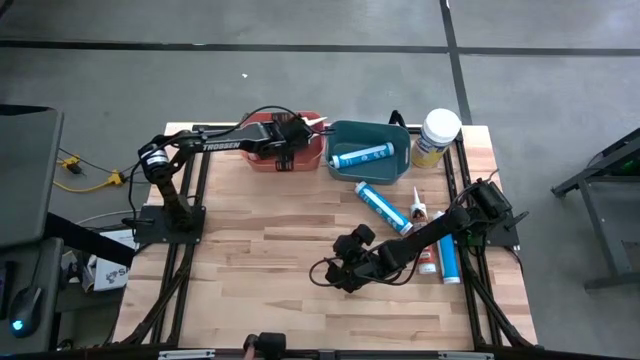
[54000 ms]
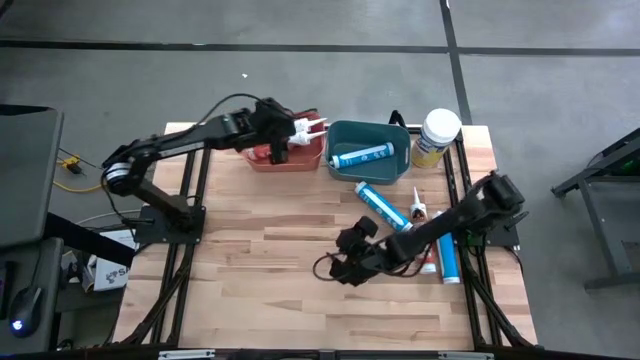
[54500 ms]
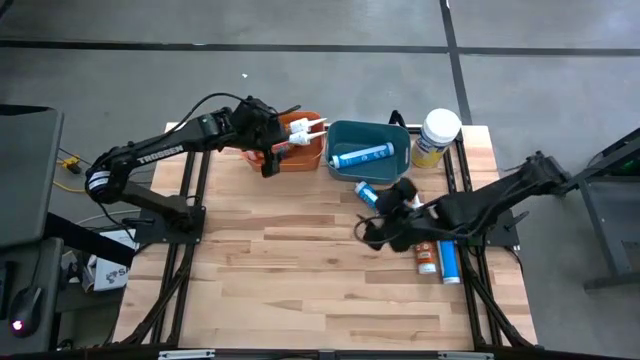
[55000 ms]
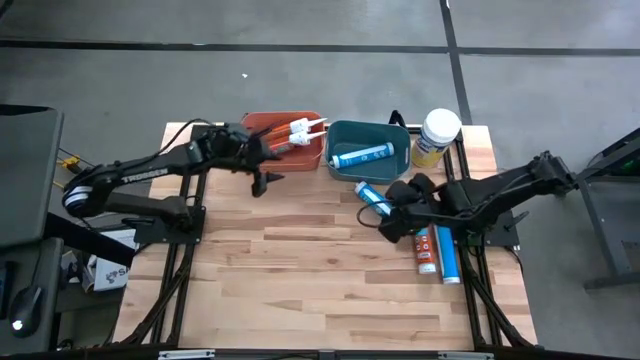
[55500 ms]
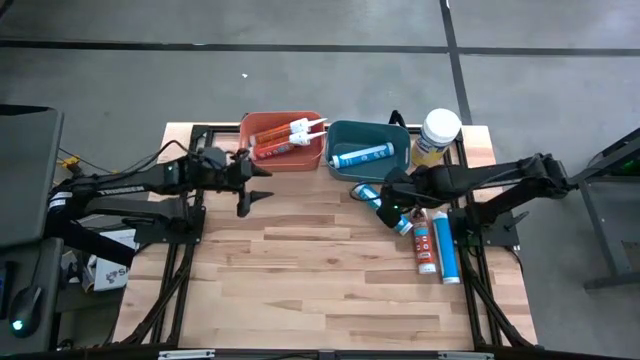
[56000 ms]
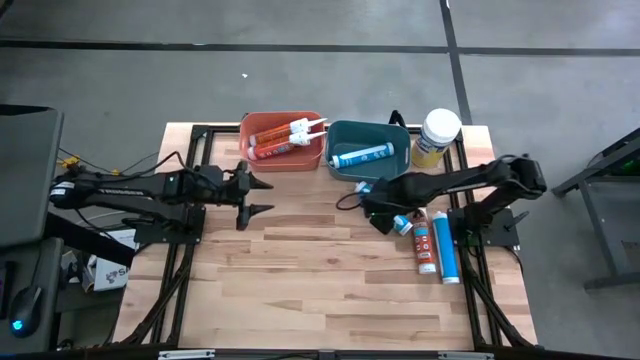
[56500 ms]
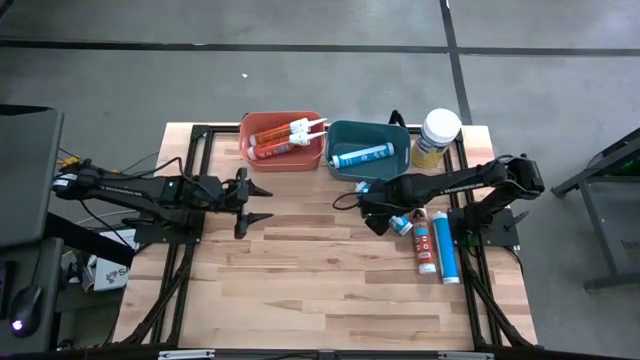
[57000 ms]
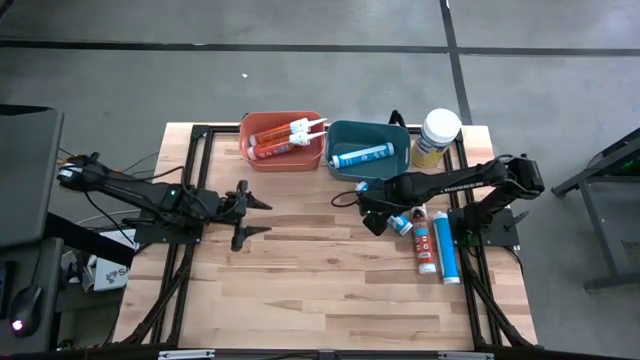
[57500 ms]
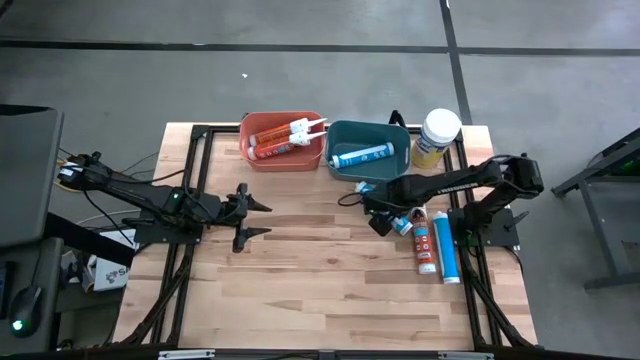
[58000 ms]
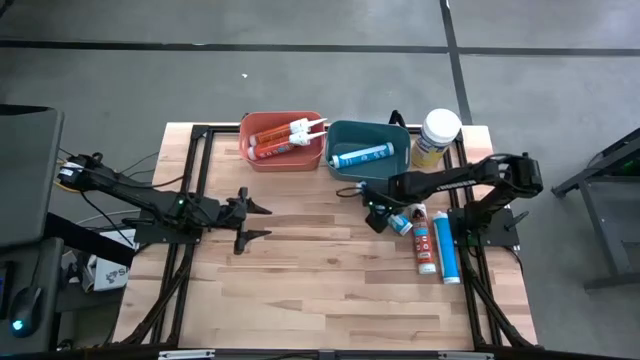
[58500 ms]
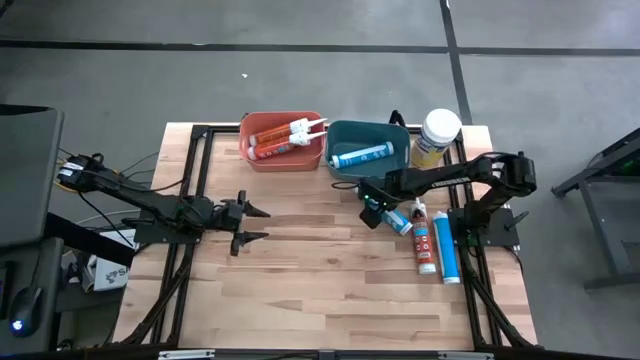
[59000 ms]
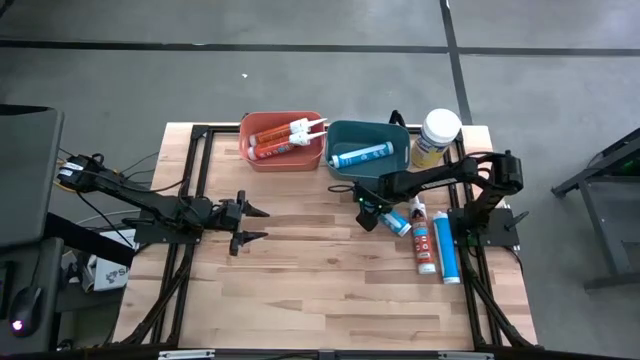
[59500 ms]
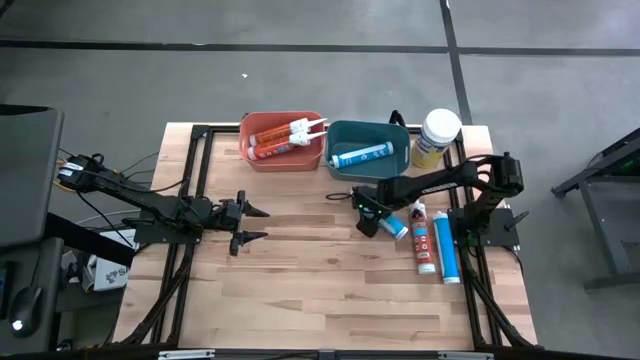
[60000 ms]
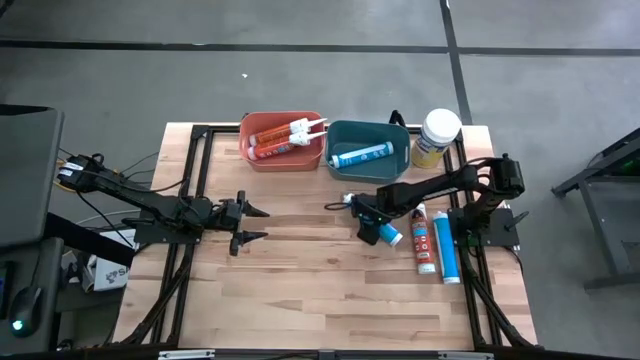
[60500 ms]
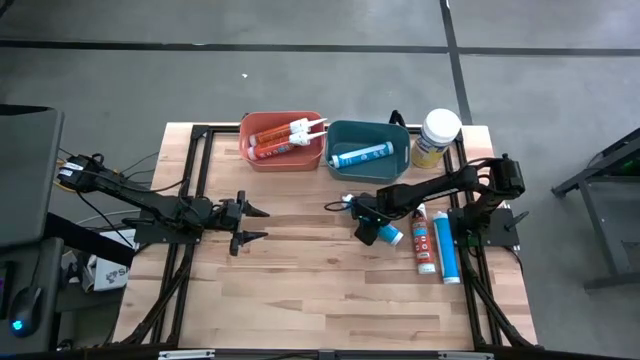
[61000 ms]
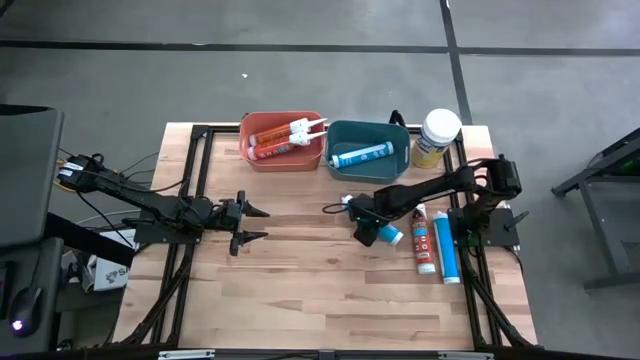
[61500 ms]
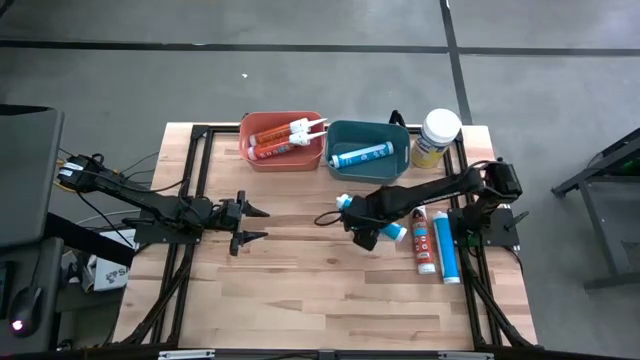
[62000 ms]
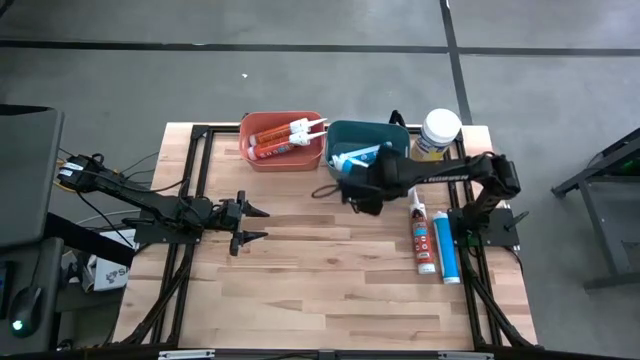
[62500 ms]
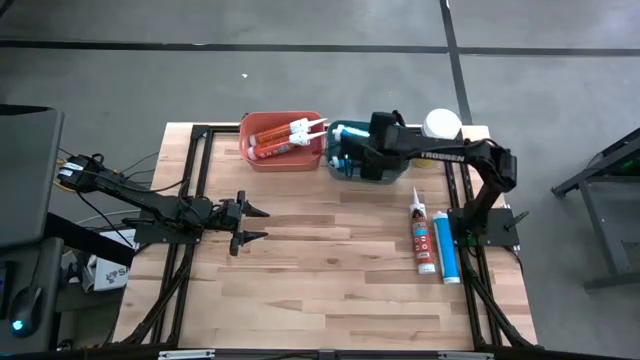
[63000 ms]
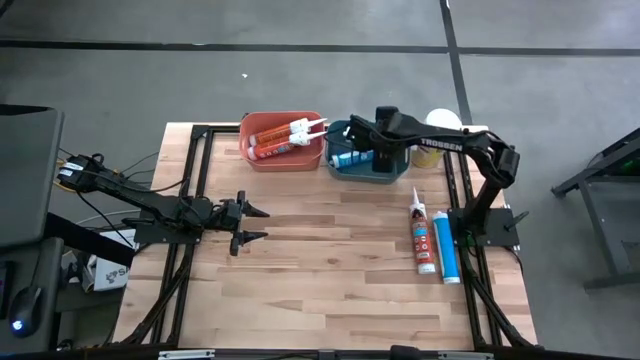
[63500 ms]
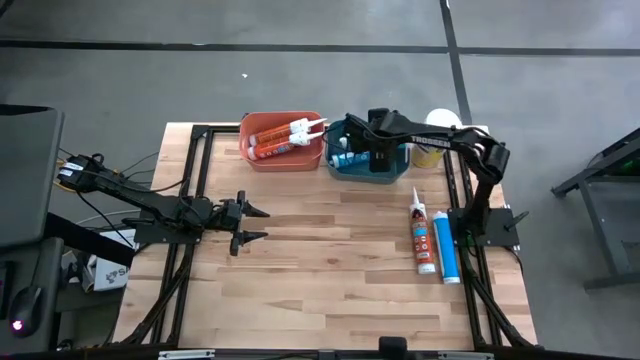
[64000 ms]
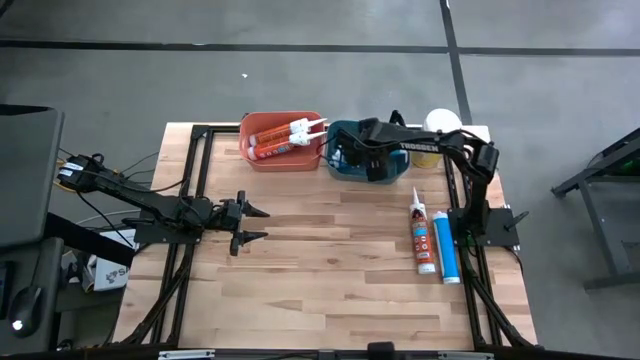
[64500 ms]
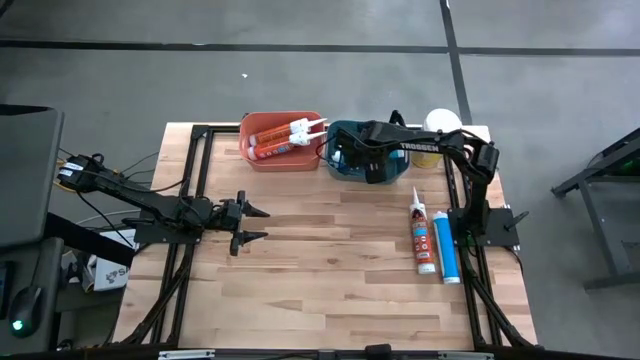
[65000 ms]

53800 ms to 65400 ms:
Task: Pick & place silicon tubes, Sealant and Lysol wipes
Put the left blue sealant into the blue bin

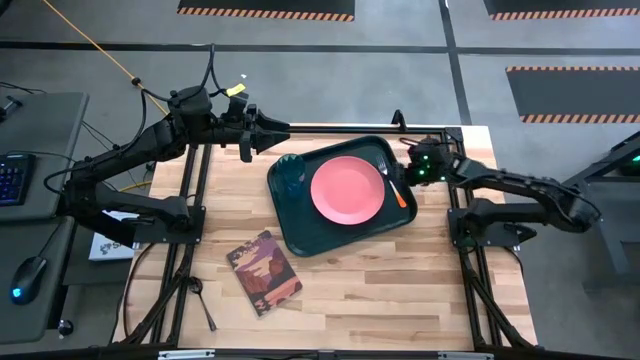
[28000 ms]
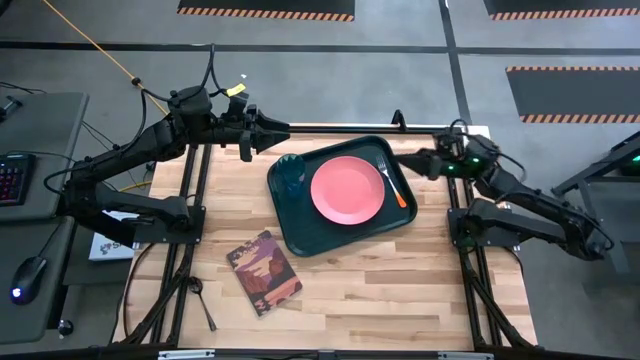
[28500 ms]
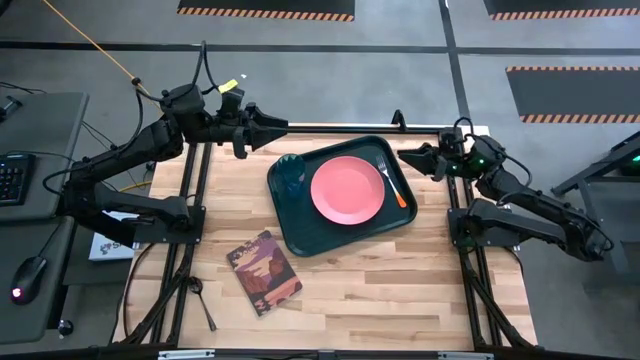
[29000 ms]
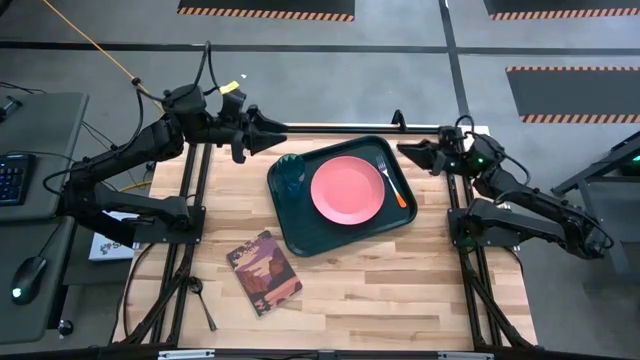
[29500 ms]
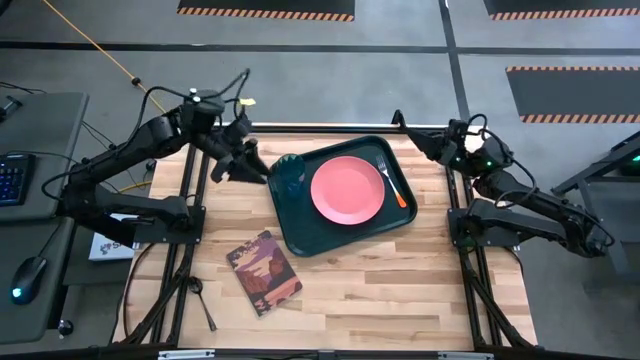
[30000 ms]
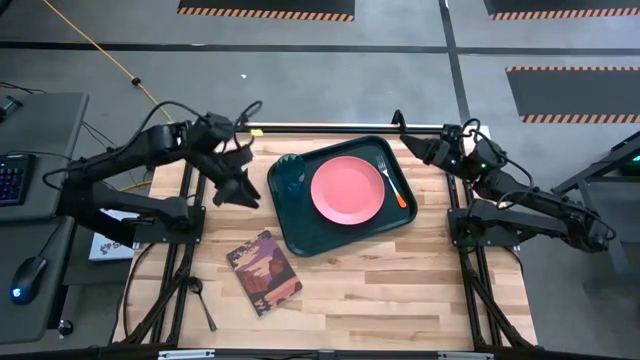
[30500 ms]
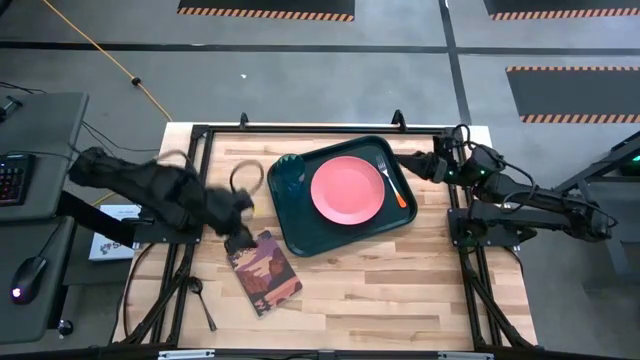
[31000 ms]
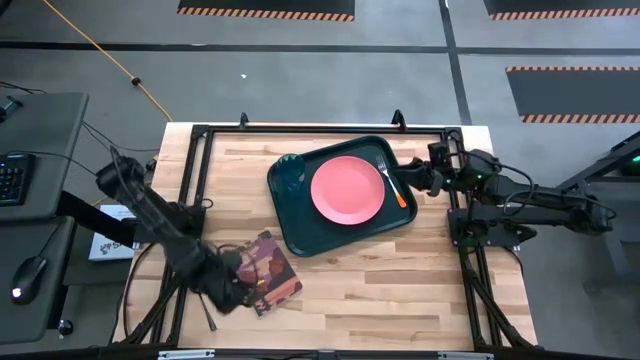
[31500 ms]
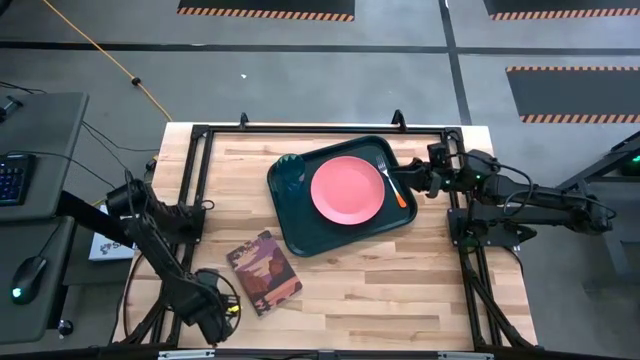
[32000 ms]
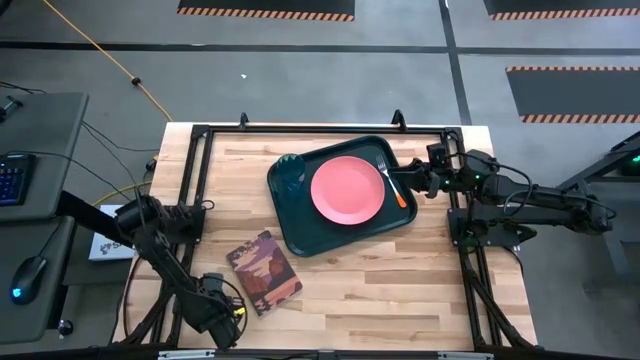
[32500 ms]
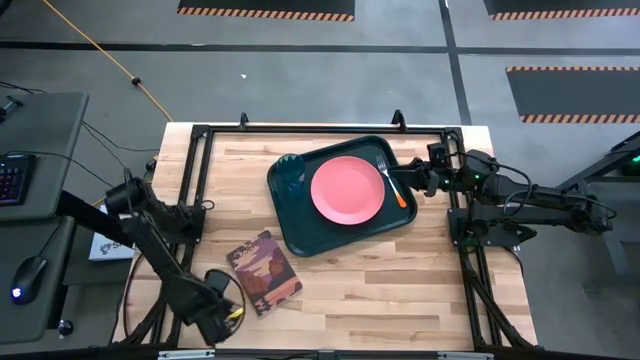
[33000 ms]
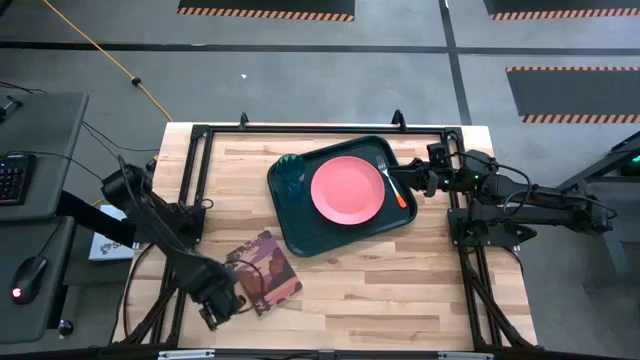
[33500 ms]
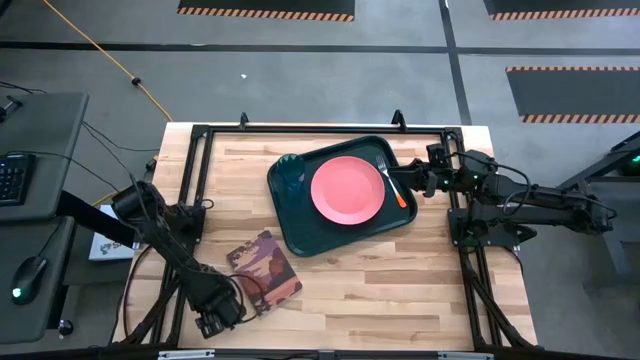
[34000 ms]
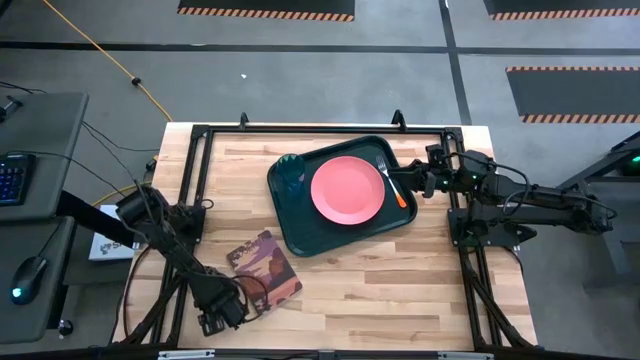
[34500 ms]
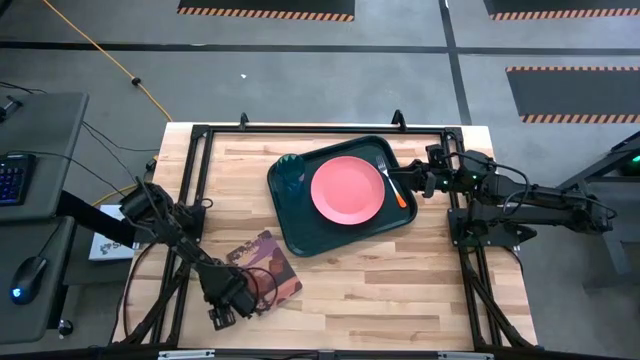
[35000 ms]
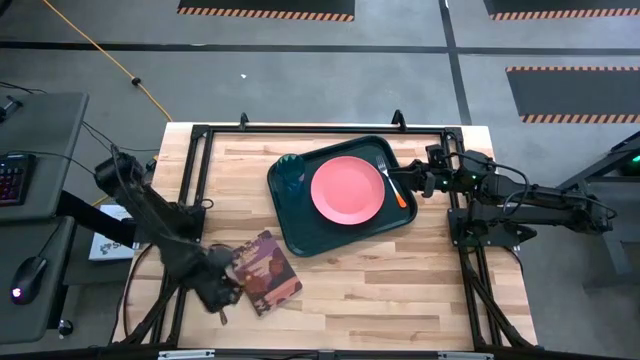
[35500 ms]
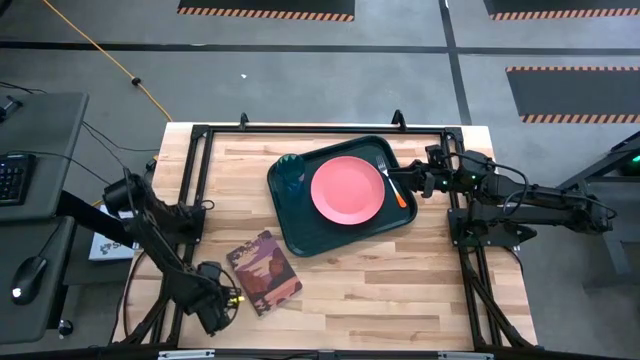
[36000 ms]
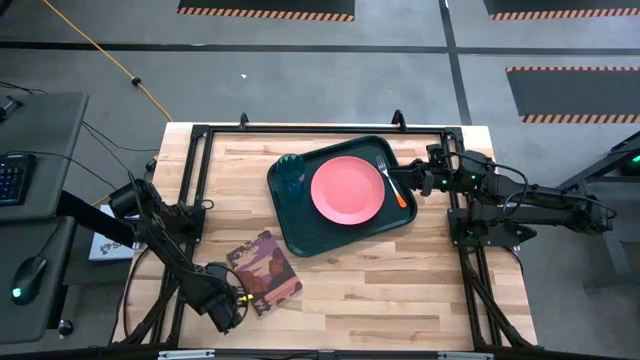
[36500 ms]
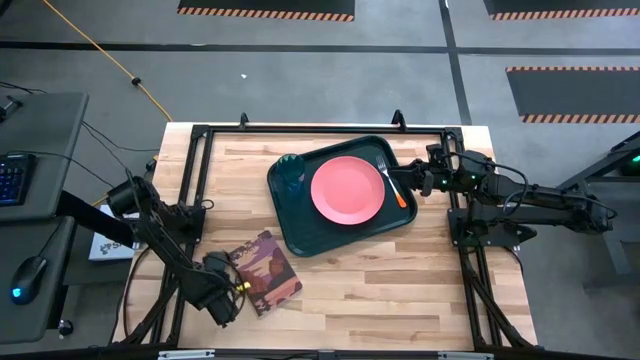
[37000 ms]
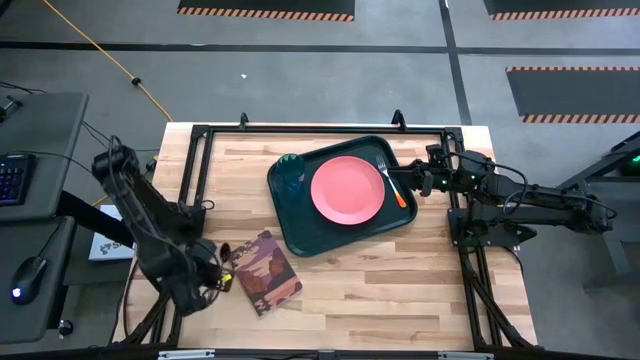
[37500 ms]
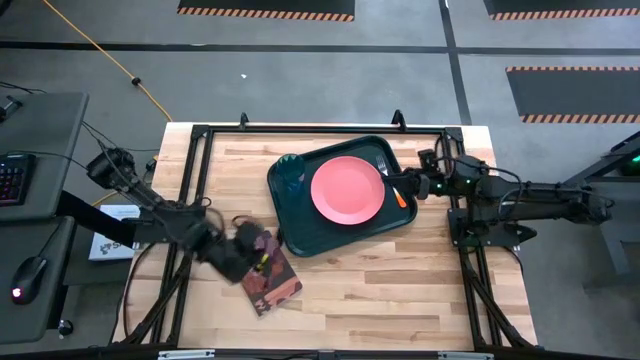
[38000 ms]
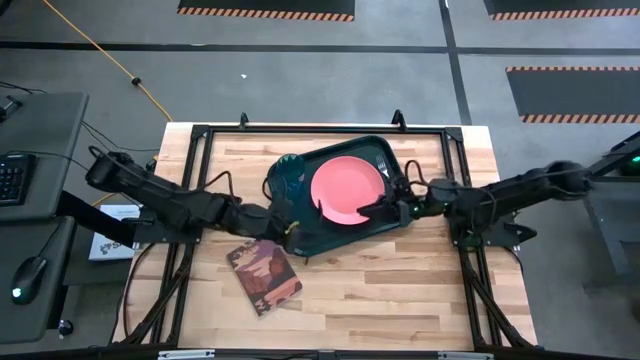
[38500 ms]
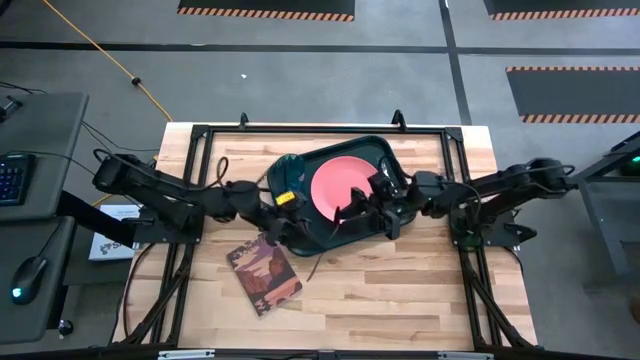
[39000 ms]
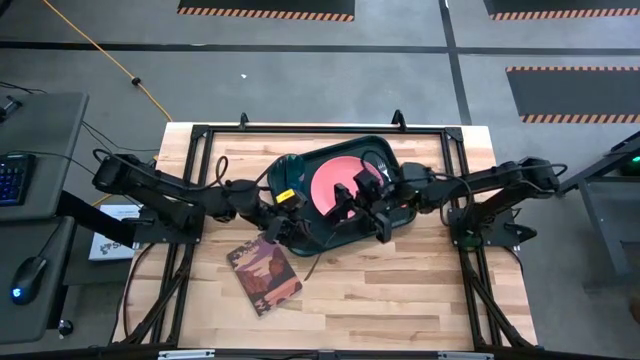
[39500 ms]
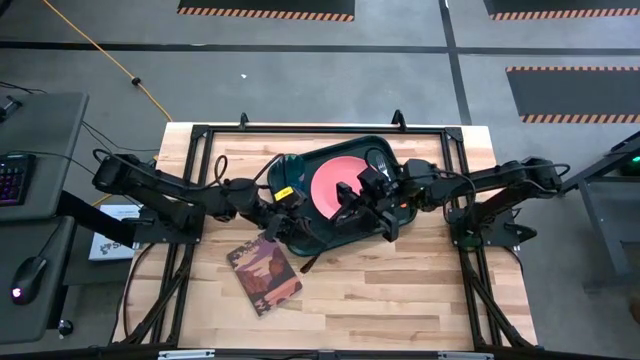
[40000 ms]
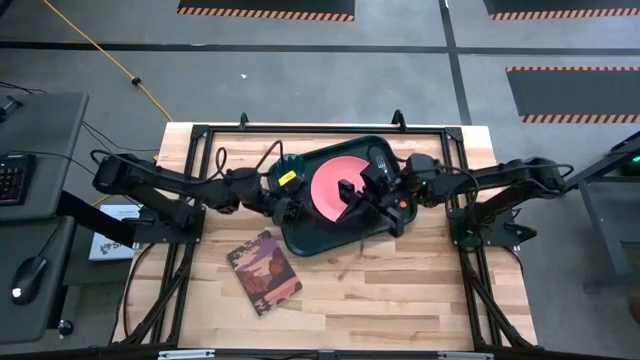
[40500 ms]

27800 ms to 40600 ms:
Task: Pick and place plate/cup/fork/spoon on tray
Put the black spoon to the right of the pink plate on the black tray
